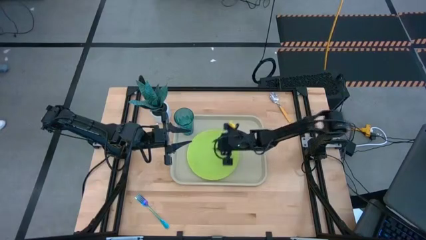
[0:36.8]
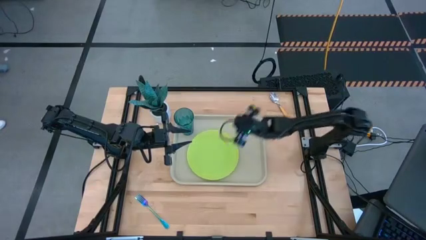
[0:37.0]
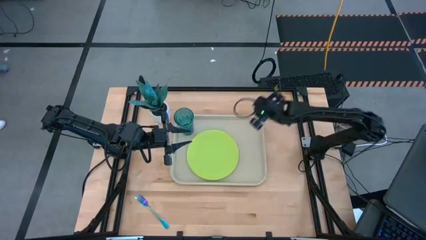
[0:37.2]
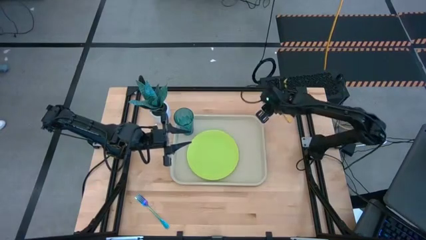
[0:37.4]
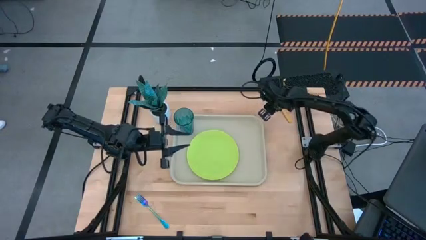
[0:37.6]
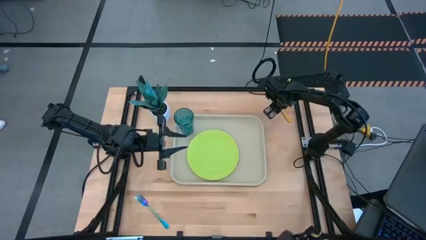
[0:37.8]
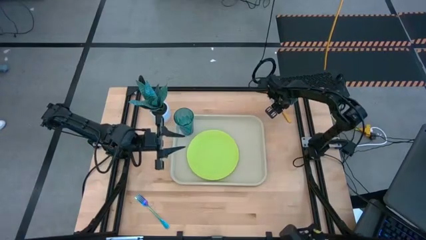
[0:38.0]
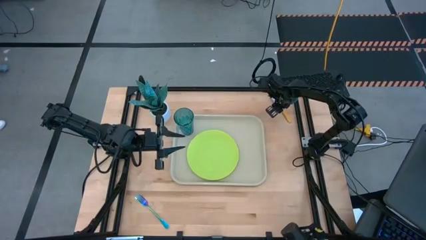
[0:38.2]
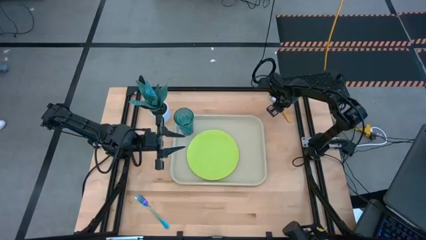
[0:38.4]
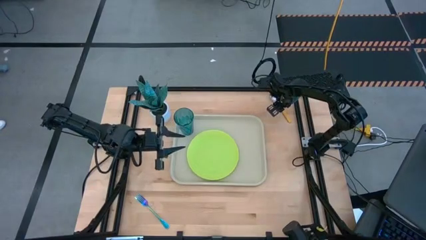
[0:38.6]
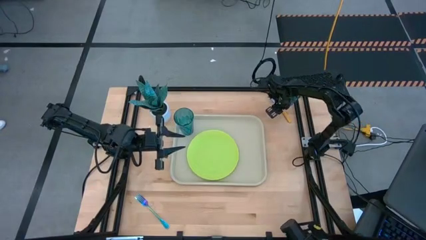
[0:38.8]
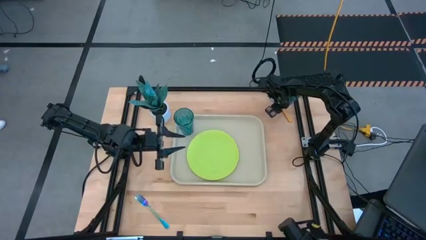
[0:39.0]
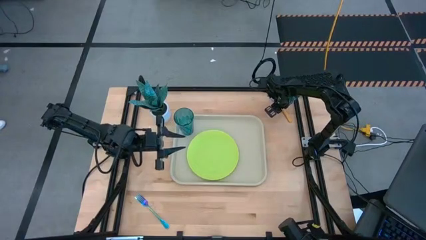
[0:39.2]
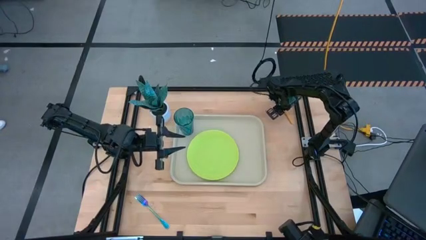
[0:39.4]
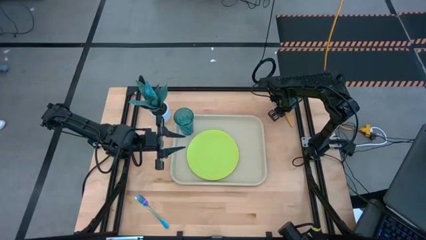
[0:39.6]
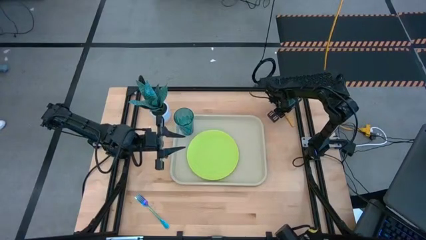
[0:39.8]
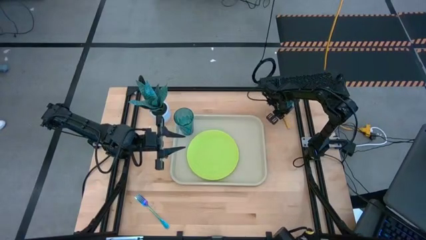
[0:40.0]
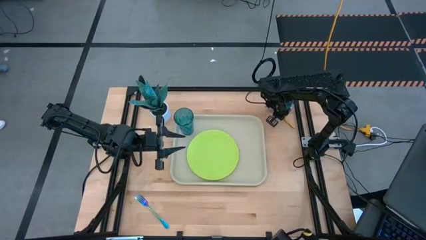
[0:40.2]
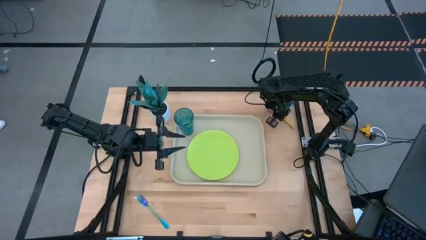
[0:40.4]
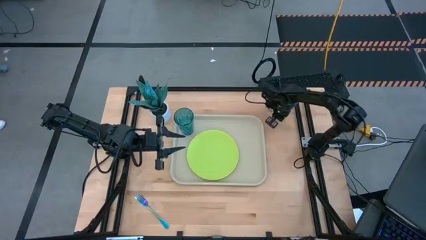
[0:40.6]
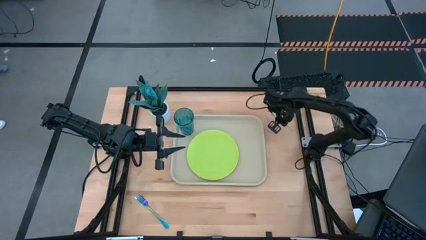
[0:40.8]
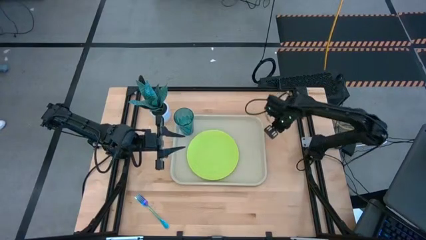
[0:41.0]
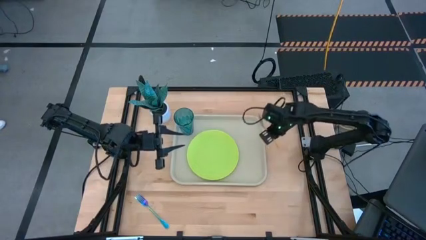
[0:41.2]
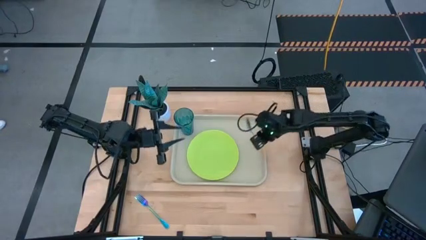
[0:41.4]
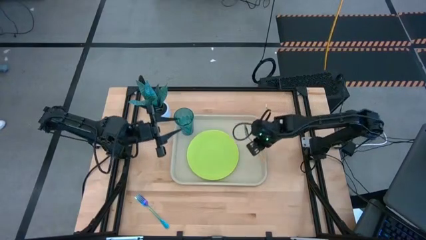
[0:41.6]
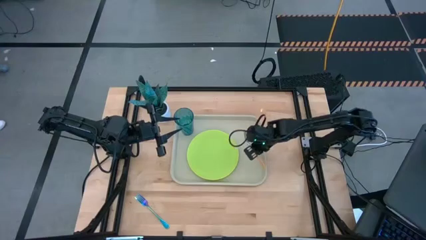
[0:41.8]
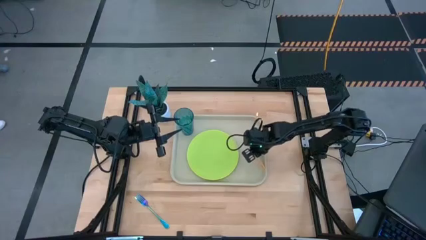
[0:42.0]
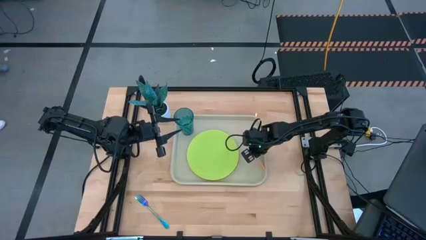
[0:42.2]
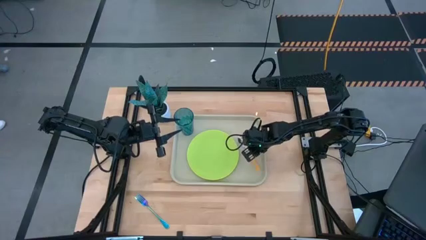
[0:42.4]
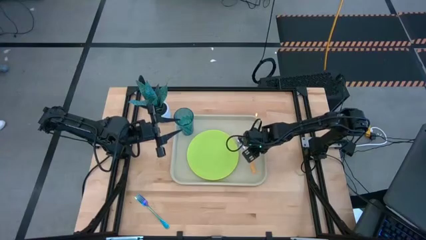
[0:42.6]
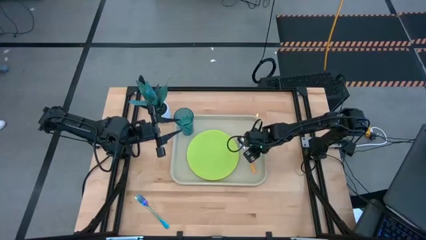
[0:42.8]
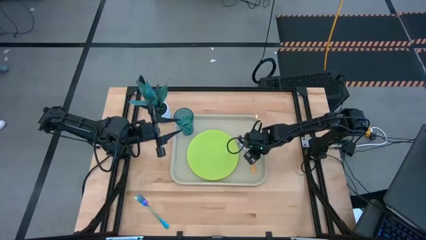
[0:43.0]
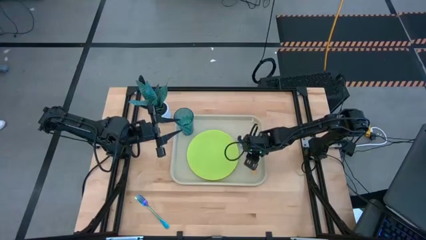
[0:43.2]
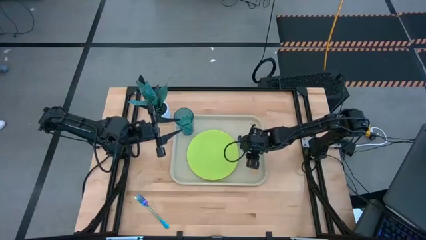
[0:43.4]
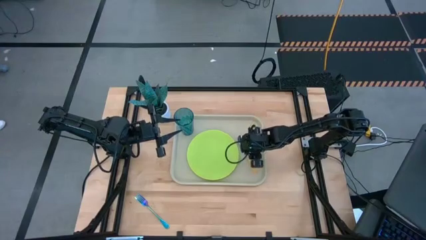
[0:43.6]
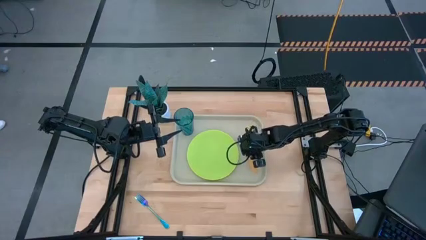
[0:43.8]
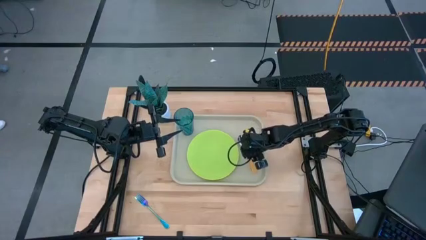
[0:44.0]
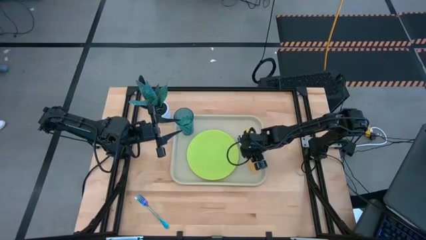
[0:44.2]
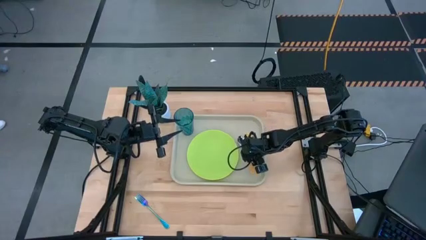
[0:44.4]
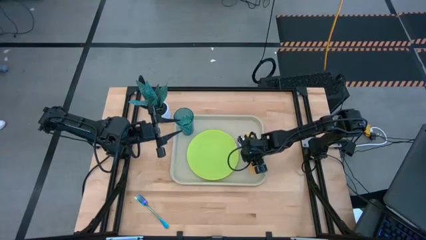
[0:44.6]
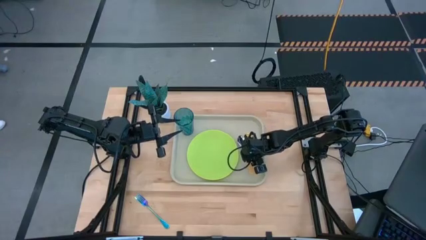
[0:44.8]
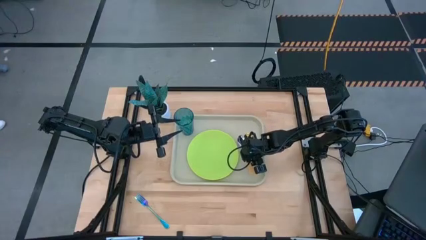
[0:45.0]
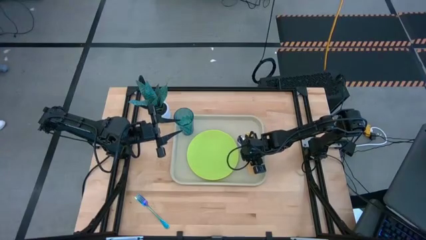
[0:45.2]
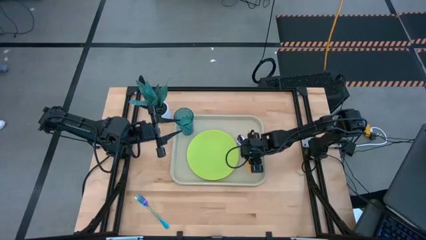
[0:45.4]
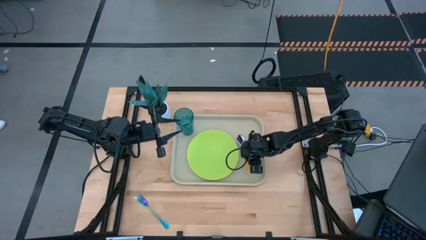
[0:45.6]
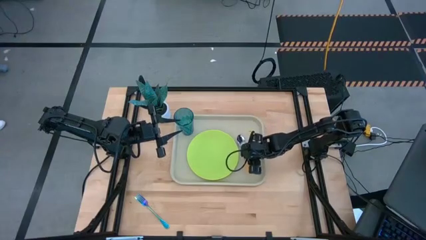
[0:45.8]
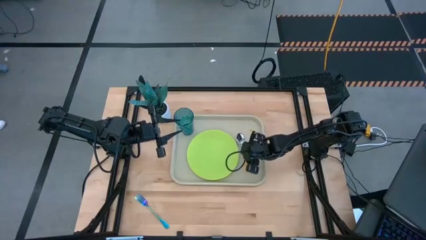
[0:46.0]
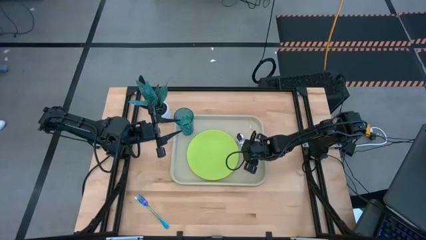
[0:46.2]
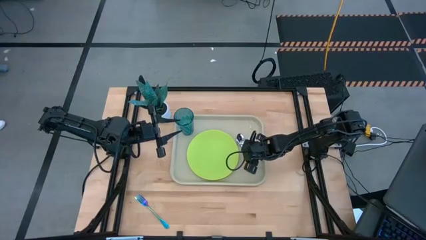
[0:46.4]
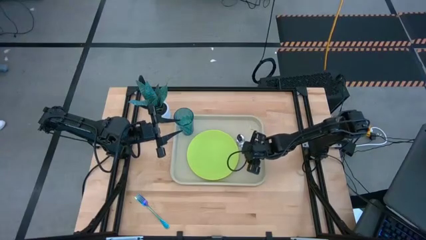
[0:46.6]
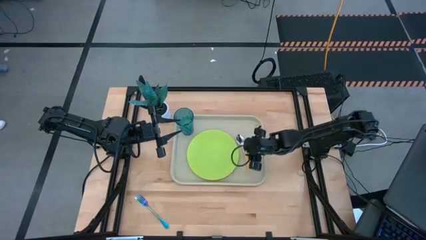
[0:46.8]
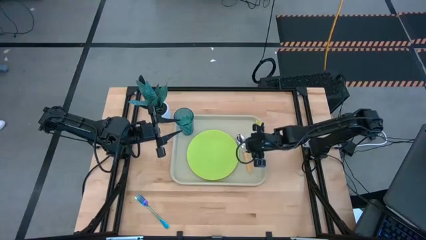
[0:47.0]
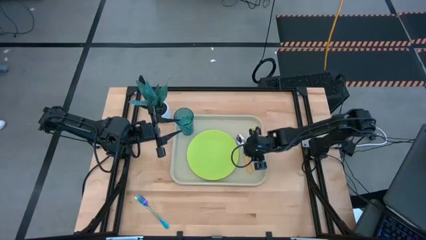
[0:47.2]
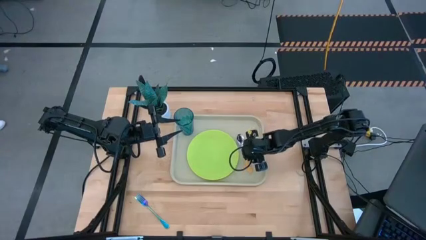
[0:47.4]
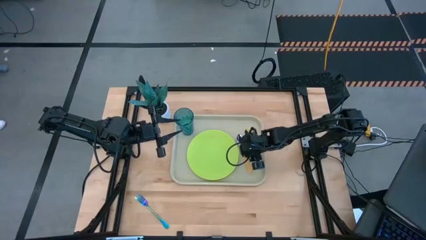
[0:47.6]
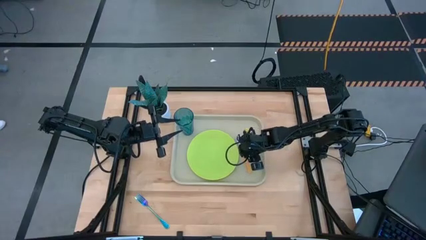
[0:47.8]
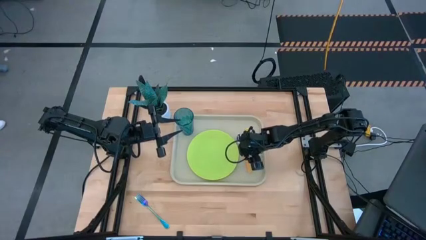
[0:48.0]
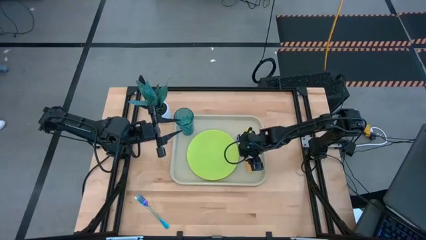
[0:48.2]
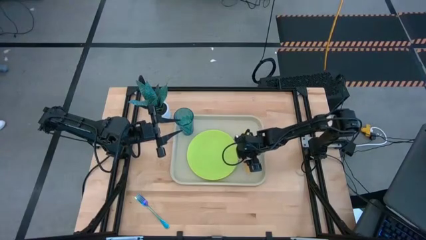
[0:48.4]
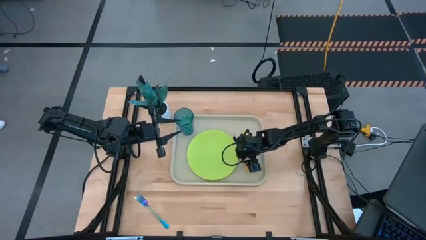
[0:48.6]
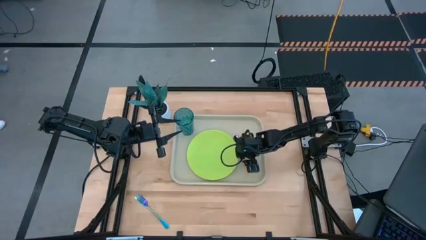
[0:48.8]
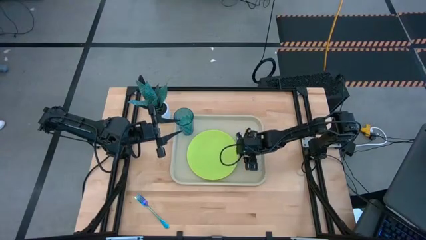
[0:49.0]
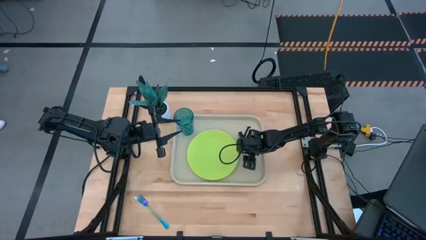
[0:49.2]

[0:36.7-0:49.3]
Task: Pick and place plate/cup/fork/spoon on tray
Put the orange spoon to the right side of the green plate on the food tray
